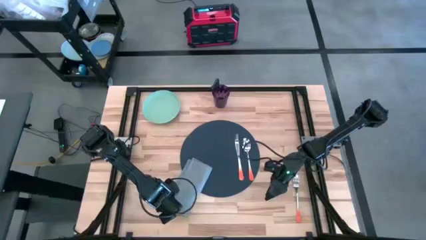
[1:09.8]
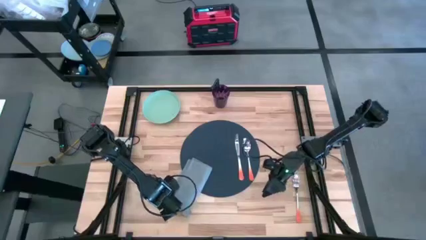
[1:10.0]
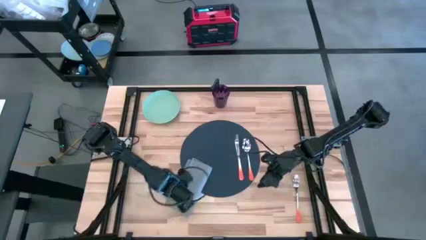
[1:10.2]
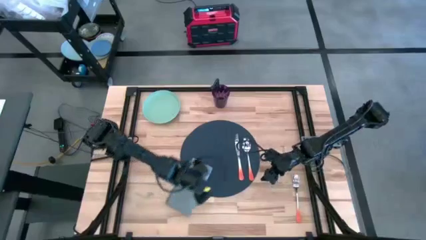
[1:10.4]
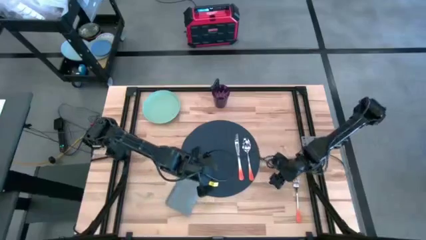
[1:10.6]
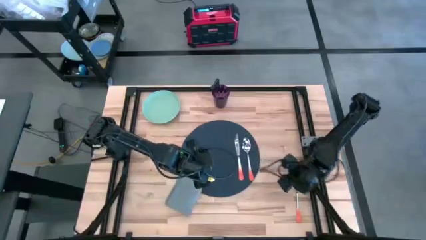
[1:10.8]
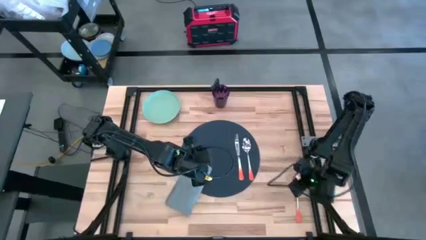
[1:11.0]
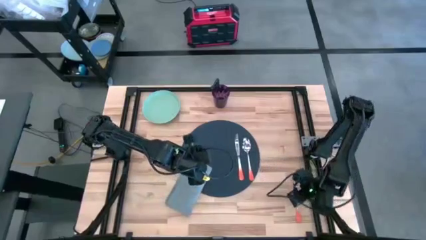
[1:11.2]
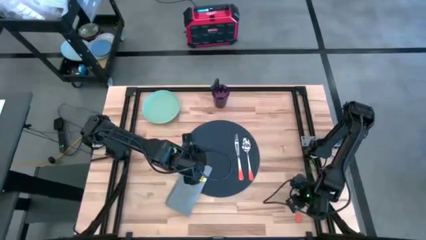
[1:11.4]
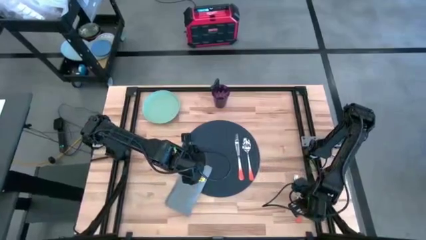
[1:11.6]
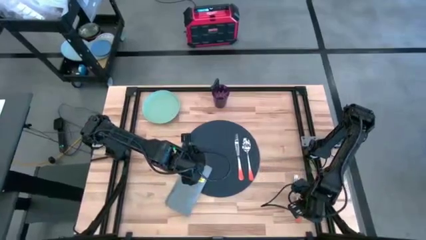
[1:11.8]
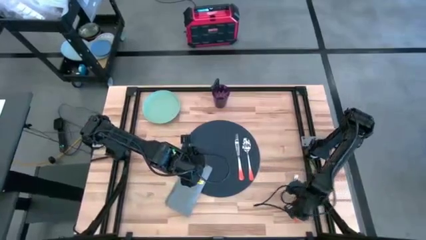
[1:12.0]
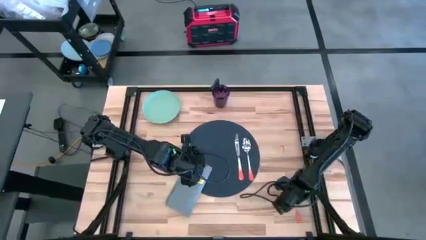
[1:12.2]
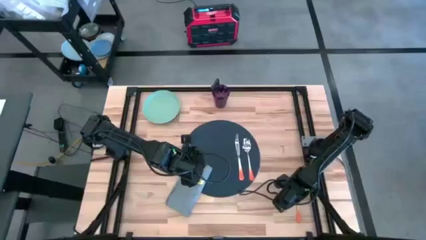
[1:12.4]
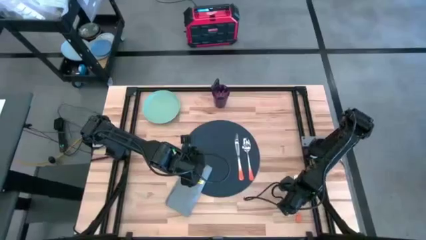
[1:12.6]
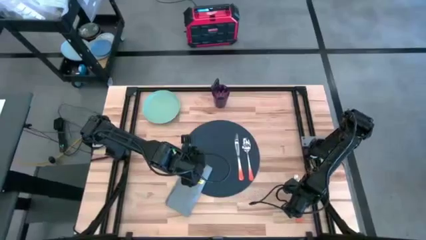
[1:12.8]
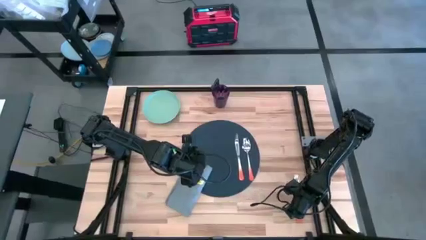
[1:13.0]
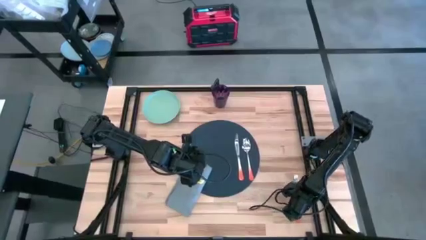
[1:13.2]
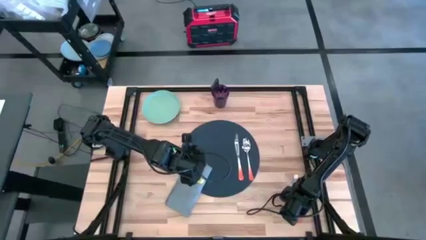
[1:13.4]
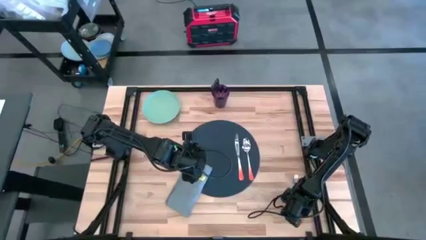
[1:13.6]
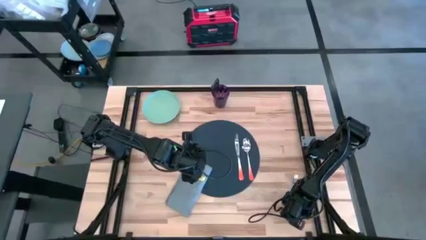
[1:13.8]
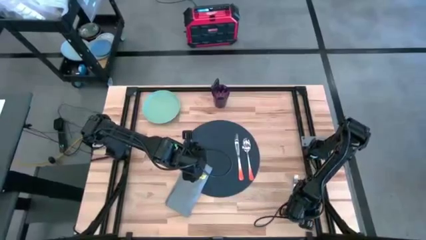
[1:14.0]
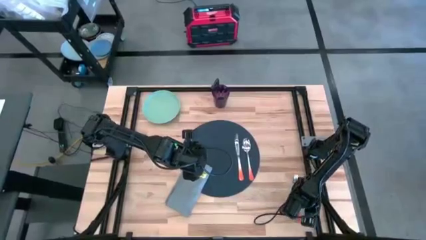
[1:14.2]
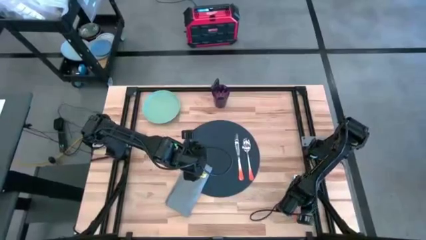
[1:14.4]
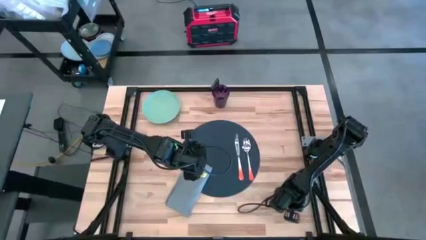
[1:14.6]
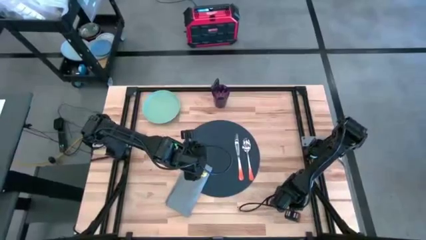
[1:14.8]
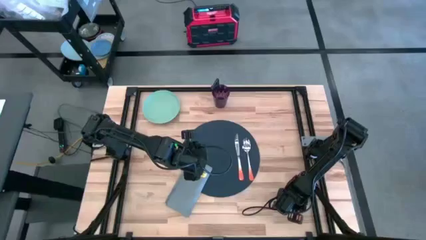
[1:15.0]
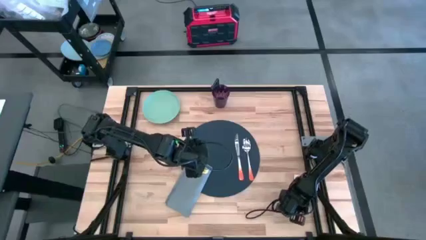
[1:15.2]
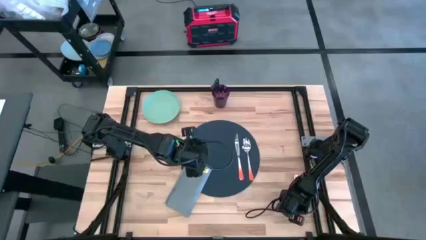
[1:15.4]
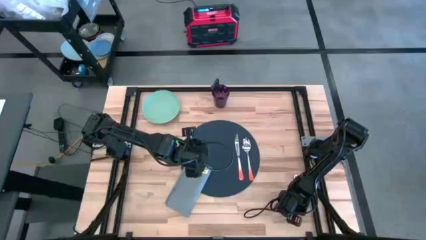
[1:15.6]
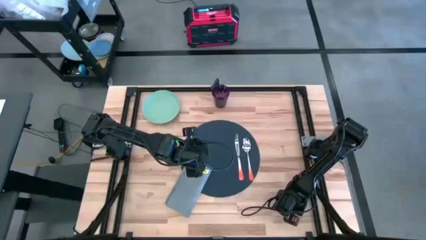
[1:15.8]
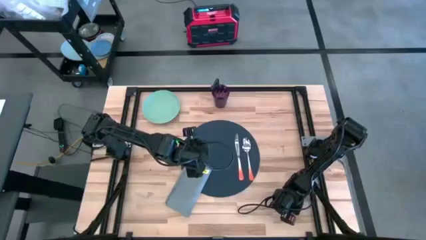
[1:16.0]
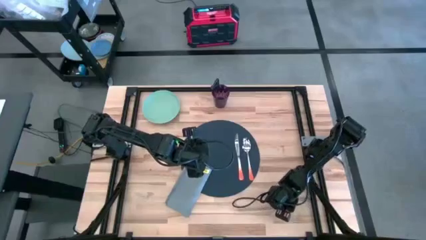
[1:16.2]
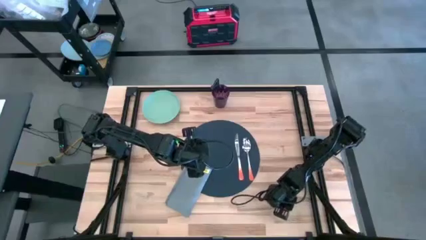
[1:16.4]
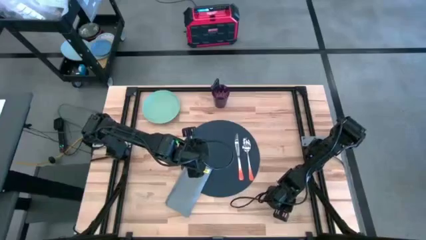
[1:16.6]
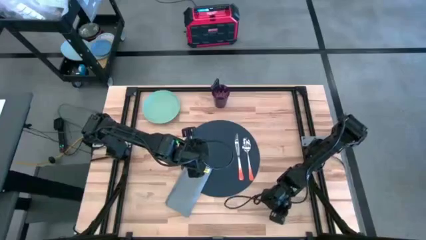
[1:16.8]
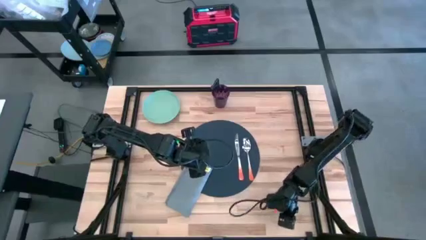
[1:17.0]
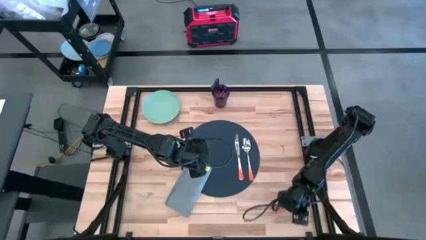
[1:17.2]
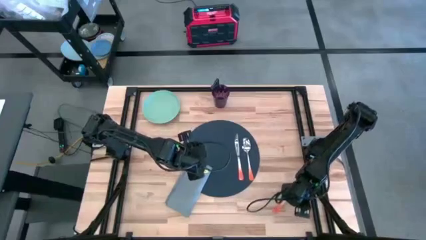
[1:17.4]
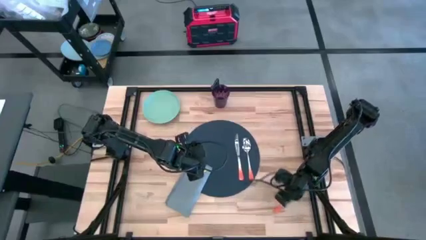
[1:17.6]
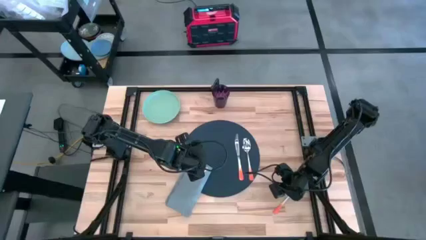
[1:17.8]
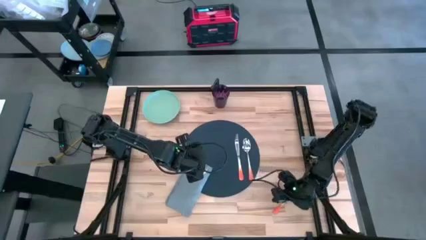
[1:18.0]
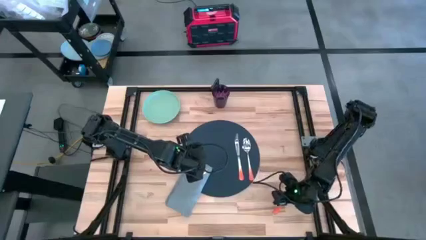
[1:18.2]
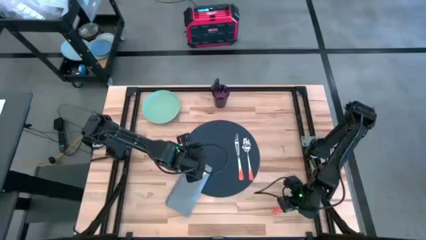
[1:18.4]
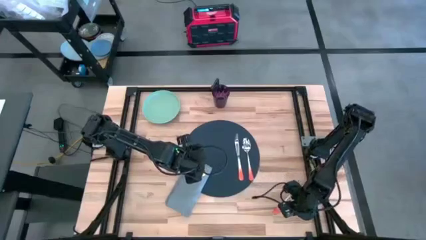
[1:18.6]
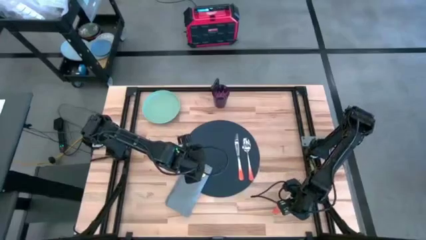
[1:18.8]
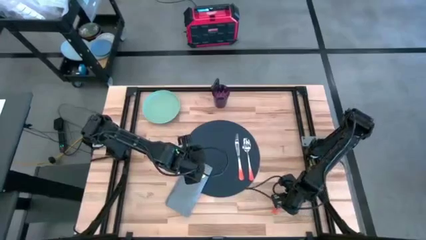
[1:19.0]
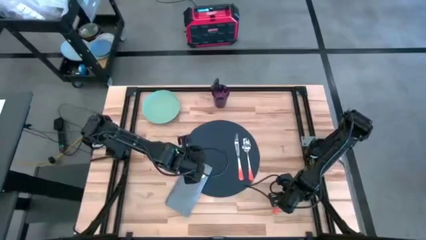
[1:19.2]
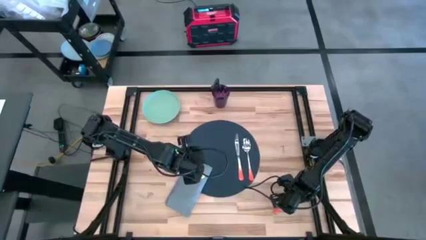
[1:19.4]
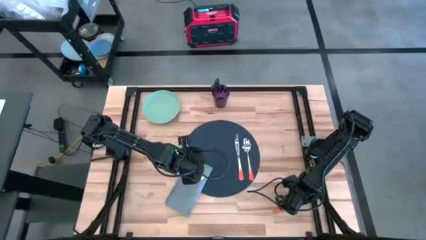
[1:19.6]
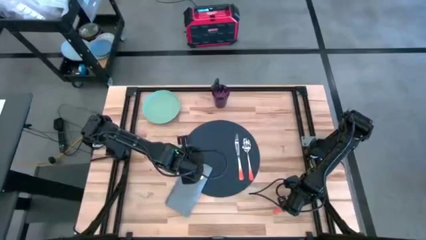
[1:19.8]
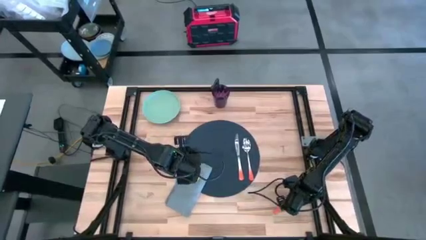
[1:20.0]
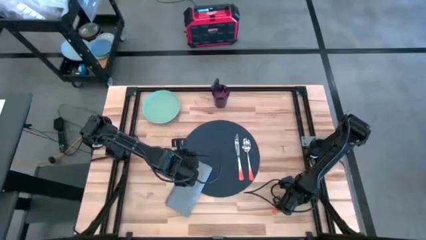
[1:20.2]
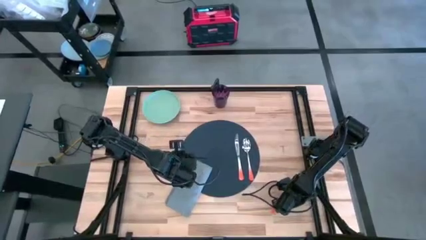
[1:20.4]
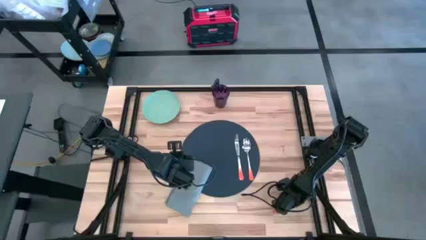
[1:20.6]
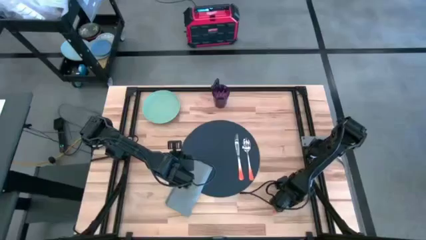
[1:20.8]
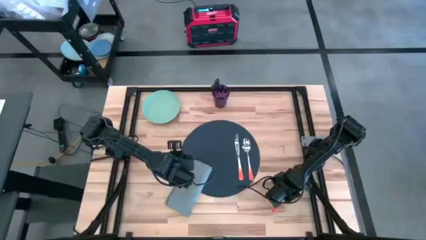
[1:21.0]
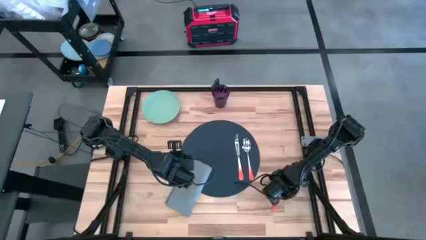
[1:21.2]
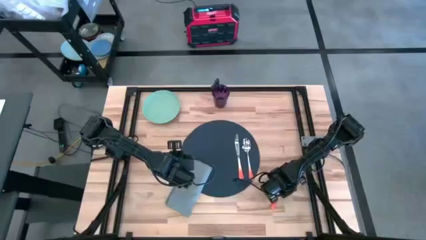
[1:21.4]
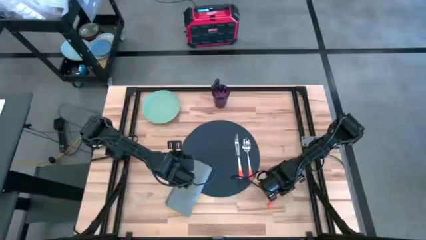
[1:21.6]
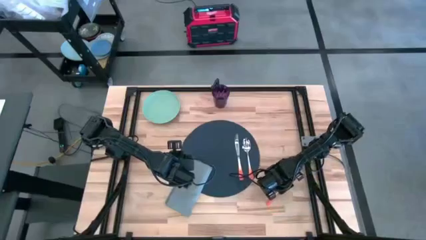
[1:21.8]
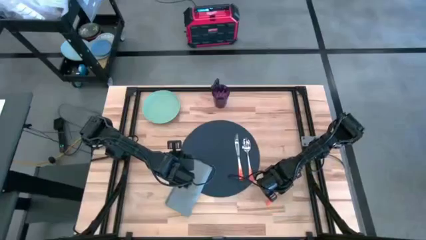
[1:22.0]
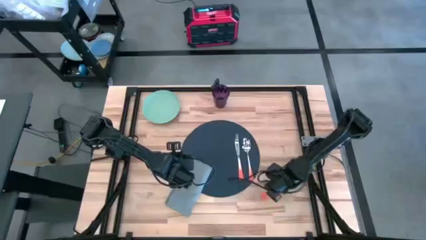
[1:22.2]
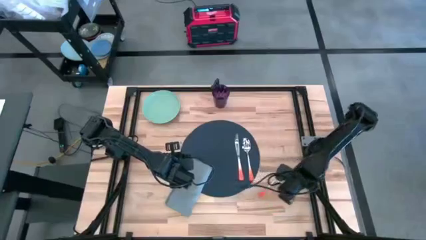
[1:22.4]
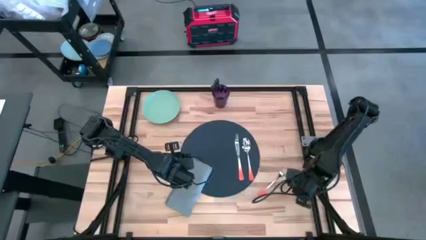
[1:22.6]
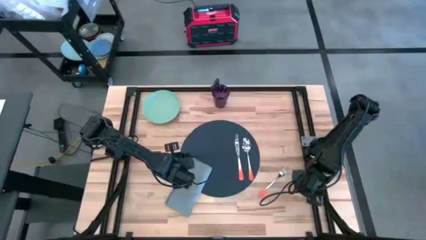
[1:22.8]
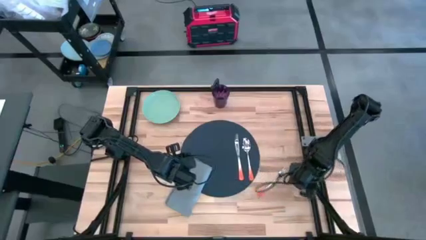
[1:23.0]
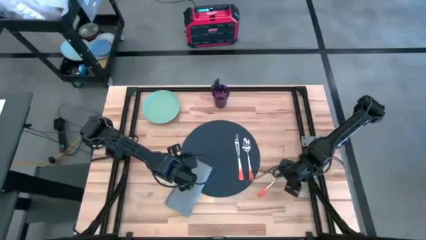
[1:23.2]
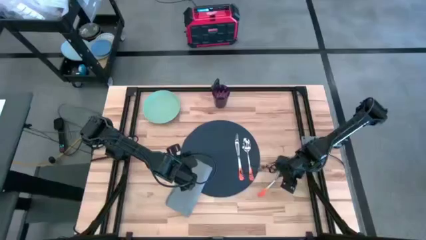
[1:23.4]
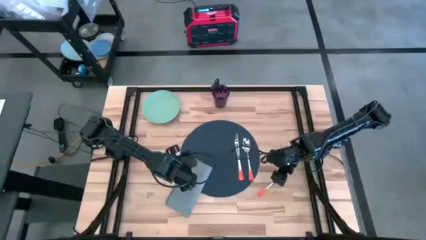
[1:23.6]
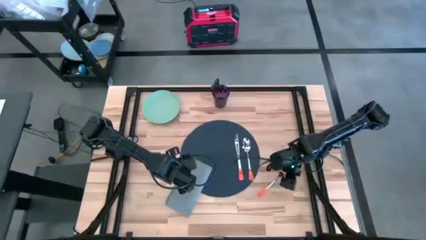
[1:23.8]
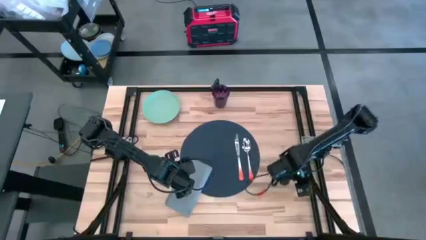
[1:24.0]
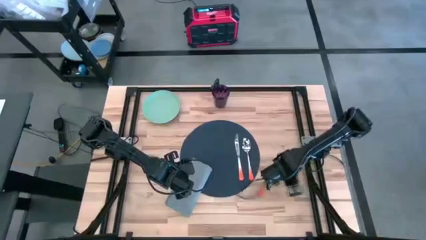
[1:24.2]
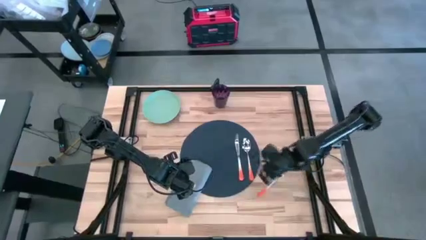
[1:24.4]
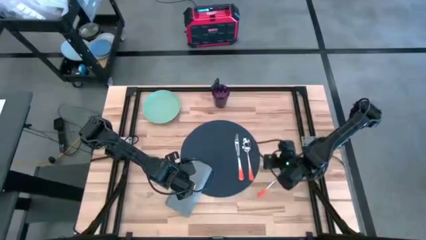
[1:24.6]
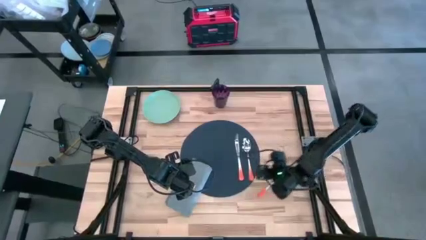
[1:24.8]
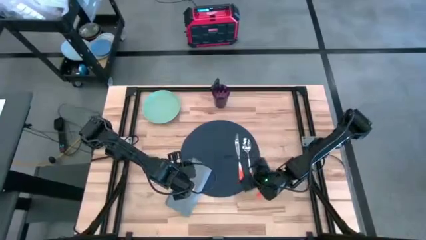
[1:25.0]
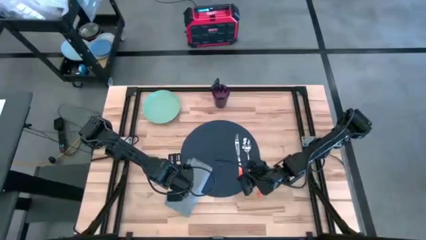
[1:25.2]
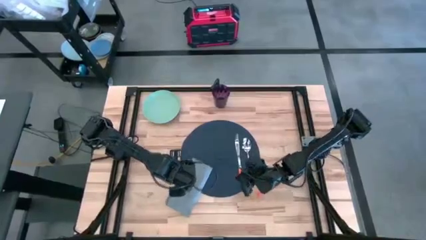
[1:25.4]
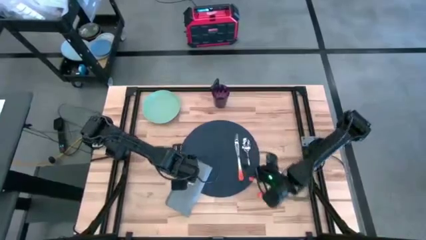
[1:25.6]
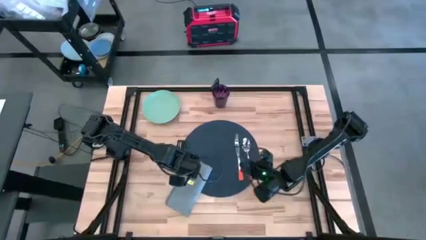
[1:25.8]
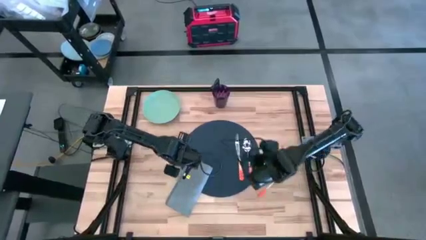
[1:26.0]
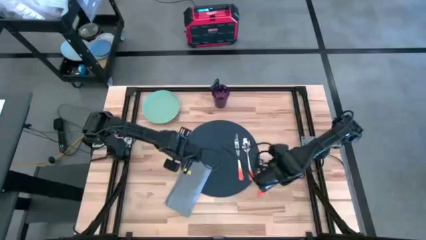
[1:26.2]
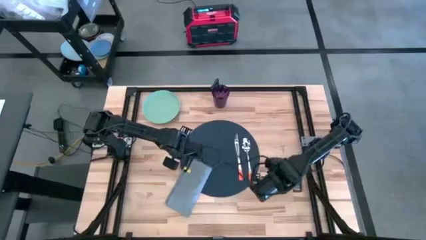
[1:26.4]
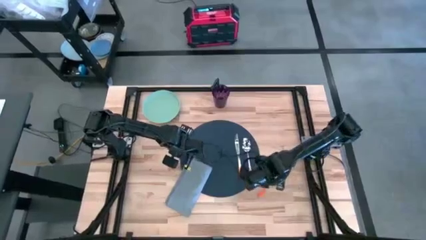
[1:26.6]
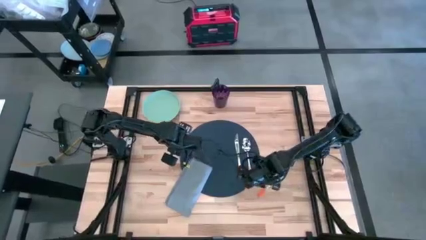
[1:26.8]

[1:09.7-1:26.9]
Task: Set table place
Put the orange fork on the table napkin
